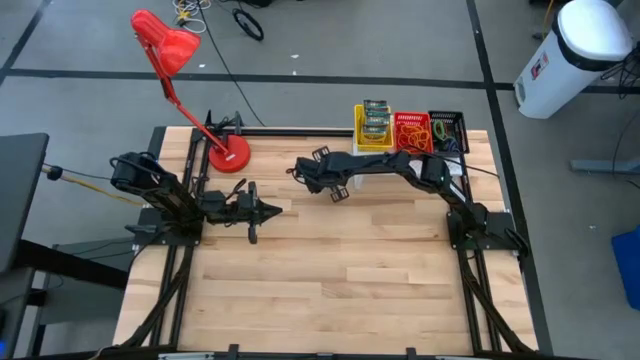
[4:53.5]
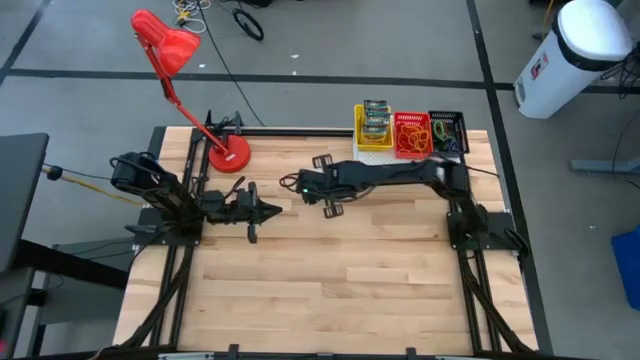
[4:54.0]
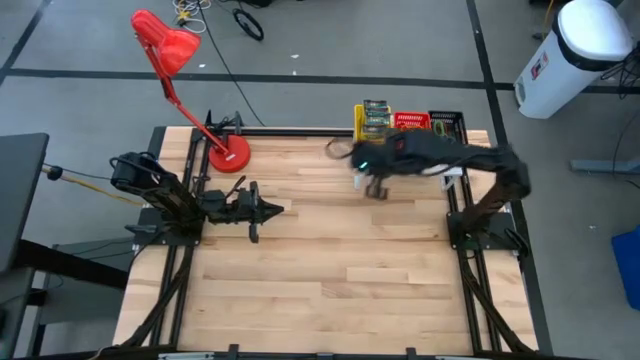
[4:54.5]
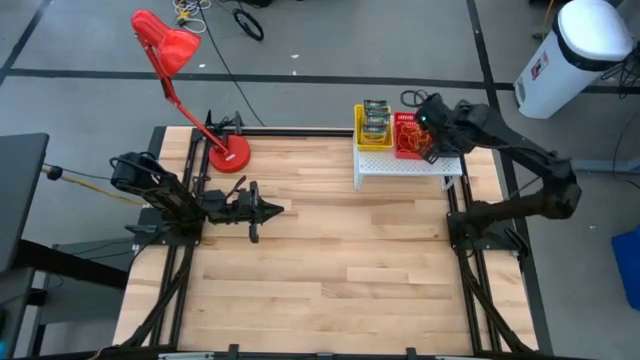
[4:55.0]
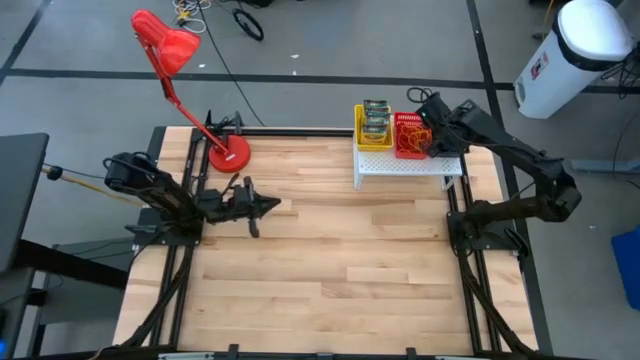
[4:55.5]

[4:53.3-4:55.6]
Task: Pick & Place Office Desk Supplies
Put the blue spring keychain on the black basket

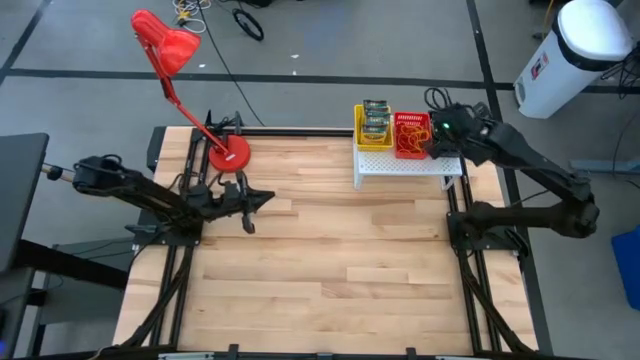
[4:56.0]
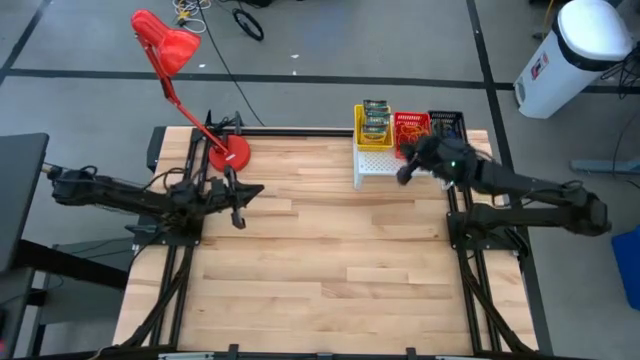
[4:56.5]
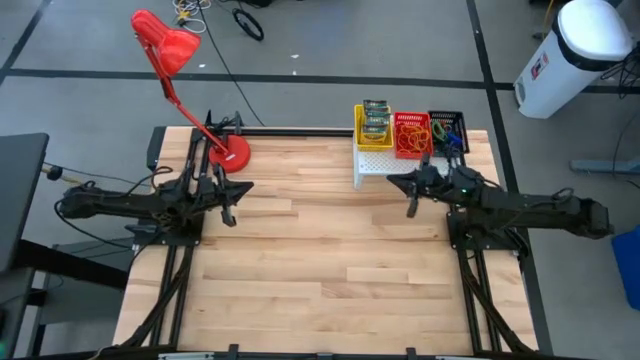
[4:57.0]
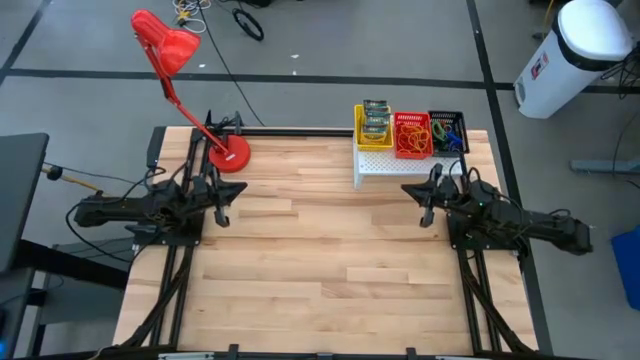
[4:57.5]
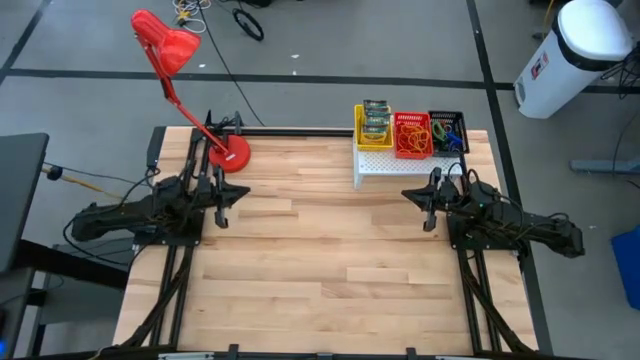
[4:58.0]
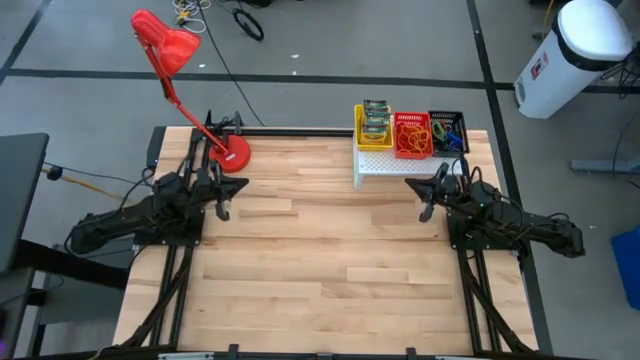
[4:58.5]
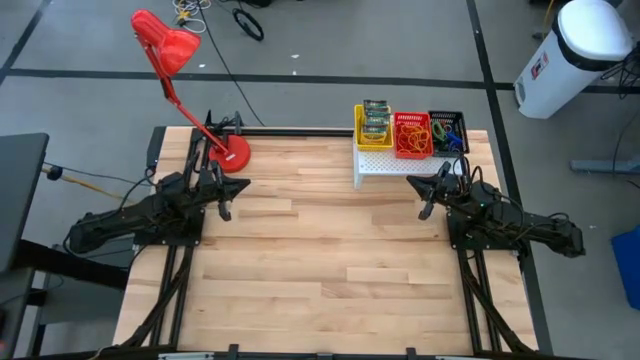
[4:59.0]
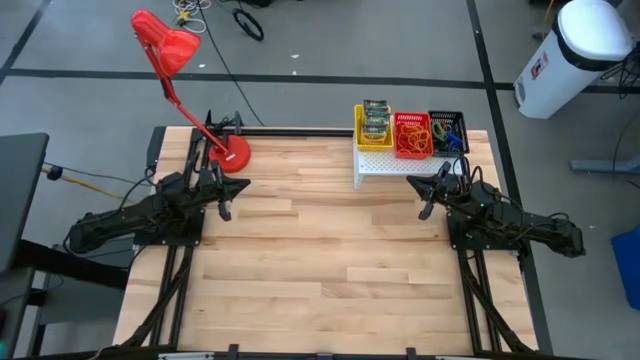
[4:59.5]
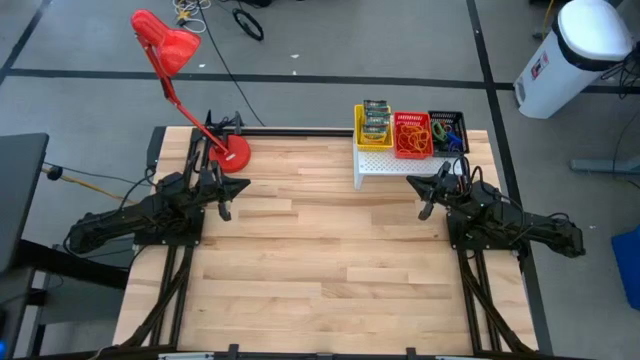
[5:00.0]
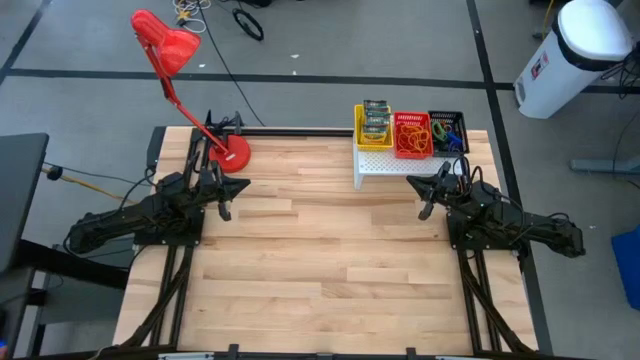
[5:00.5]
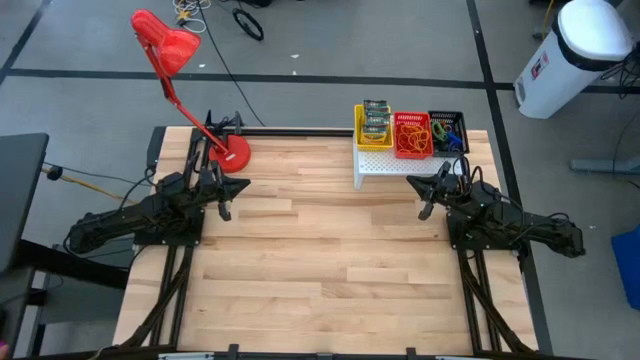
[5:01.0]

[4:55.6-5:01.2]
Return to Home Position

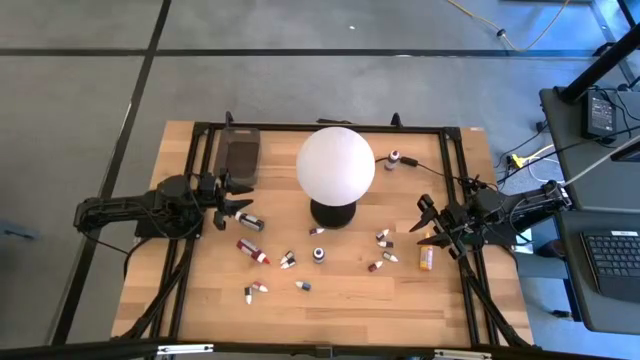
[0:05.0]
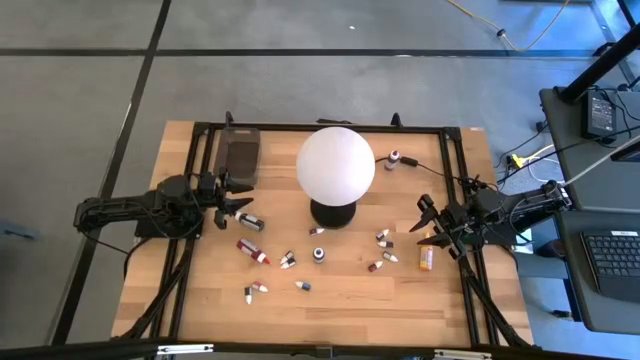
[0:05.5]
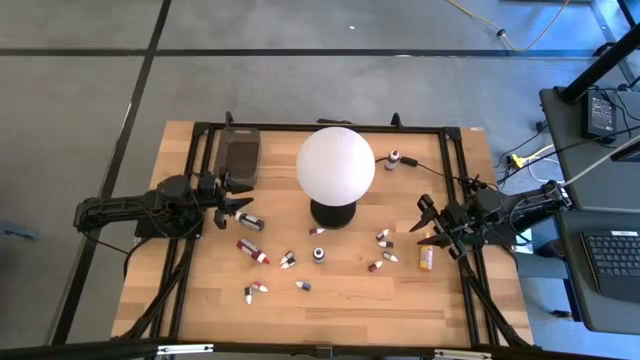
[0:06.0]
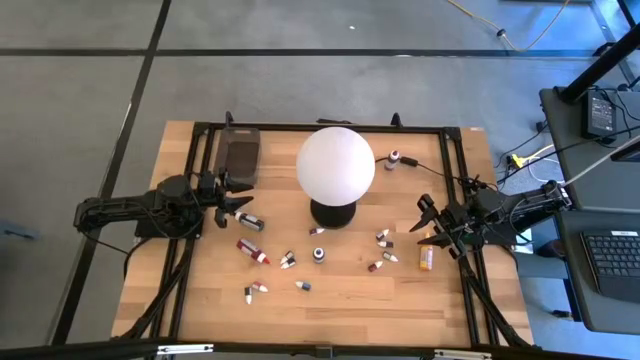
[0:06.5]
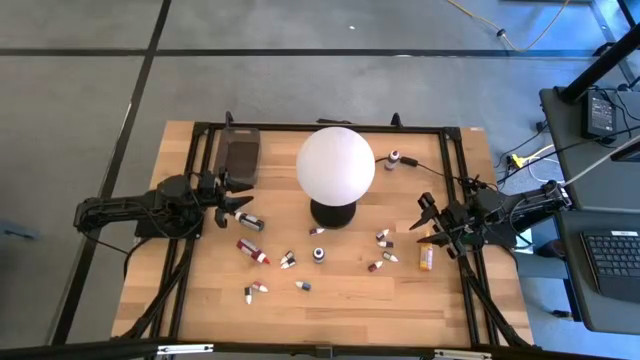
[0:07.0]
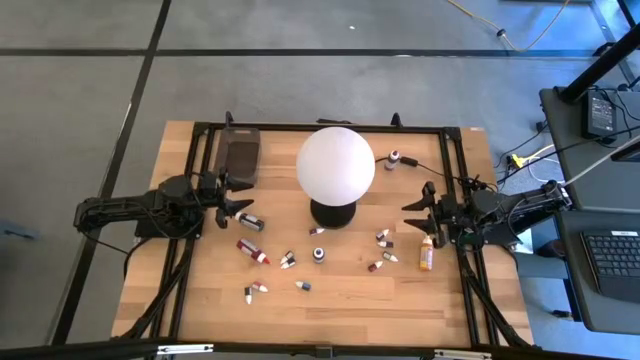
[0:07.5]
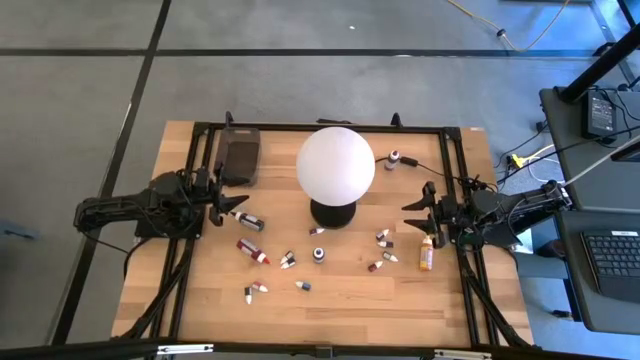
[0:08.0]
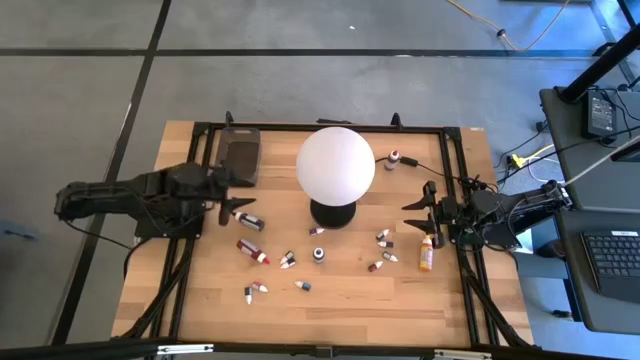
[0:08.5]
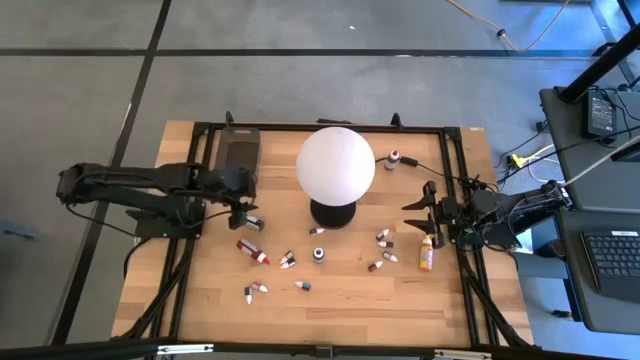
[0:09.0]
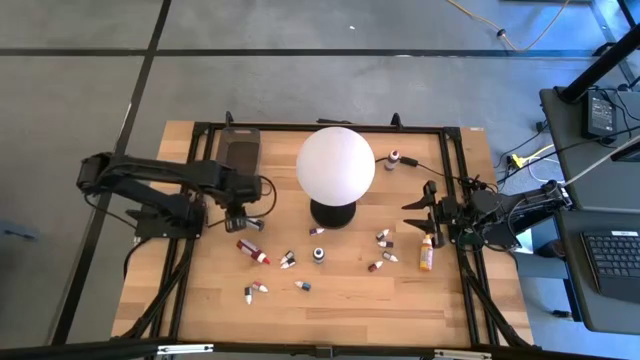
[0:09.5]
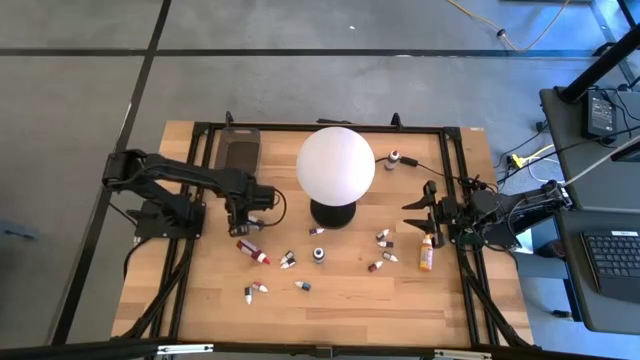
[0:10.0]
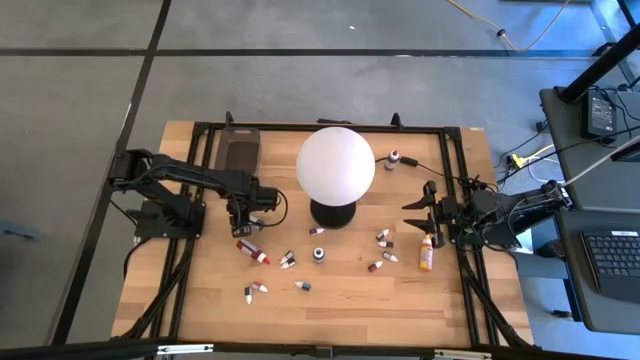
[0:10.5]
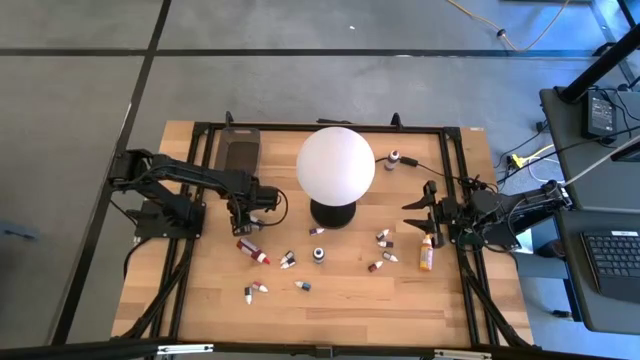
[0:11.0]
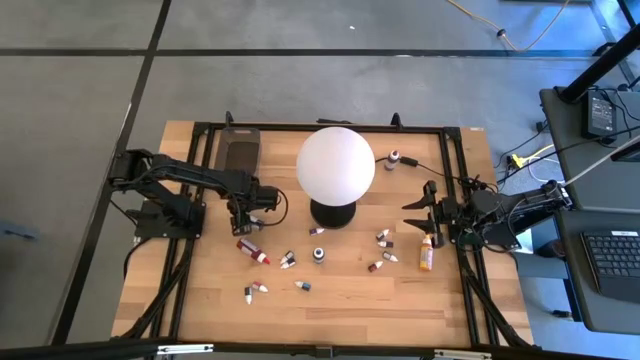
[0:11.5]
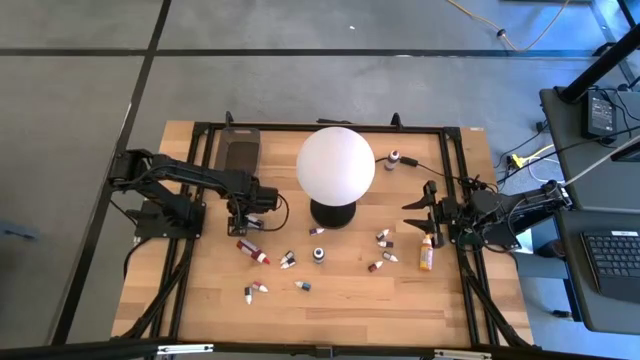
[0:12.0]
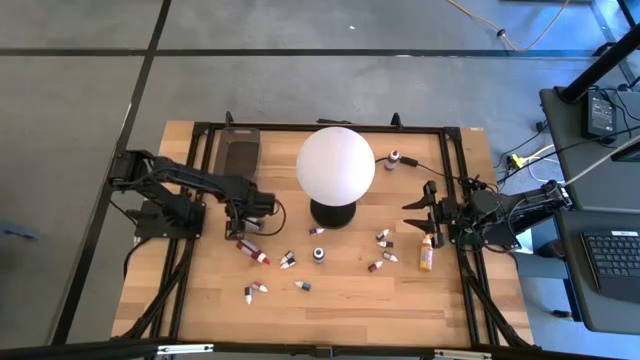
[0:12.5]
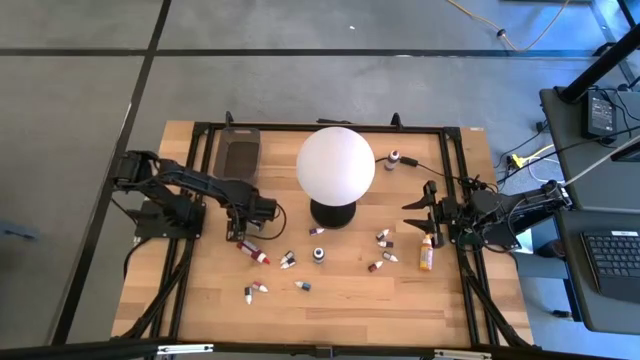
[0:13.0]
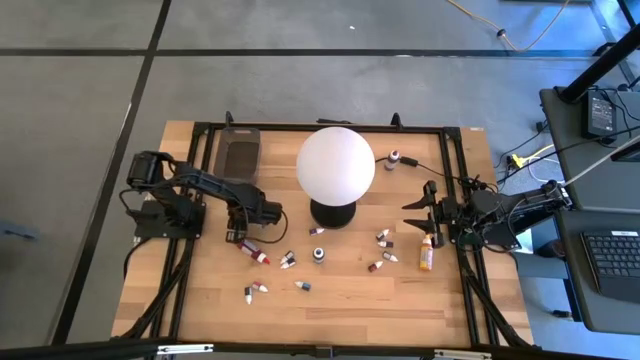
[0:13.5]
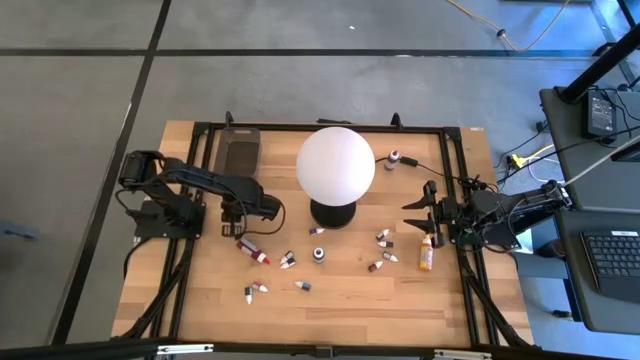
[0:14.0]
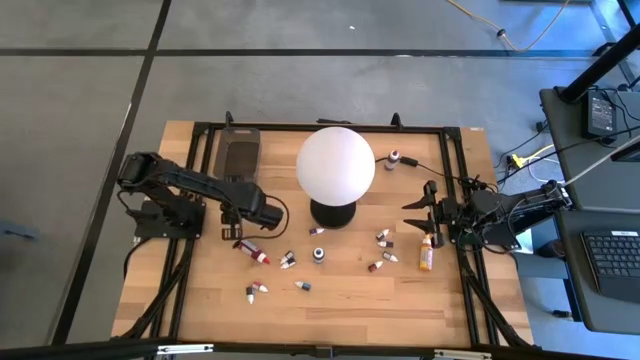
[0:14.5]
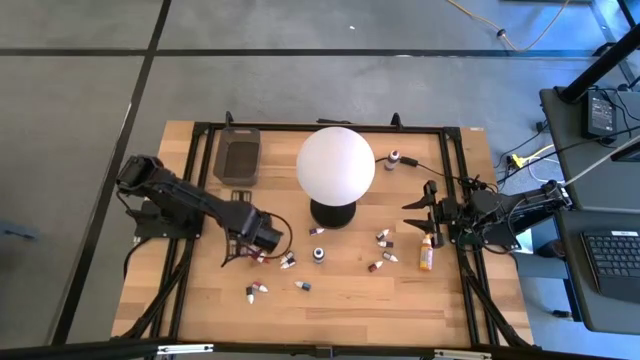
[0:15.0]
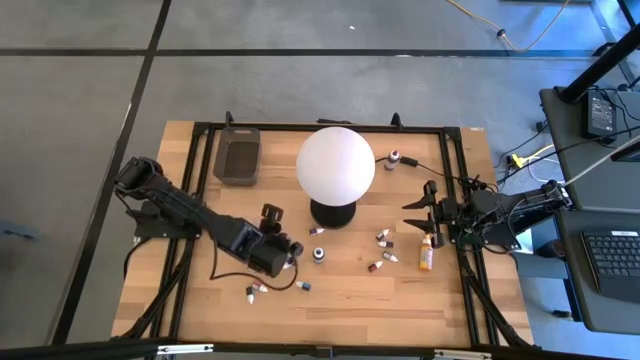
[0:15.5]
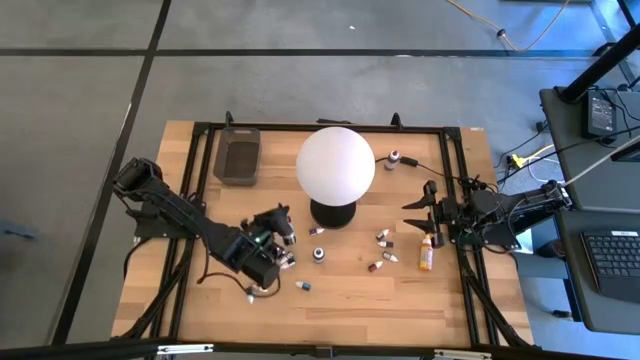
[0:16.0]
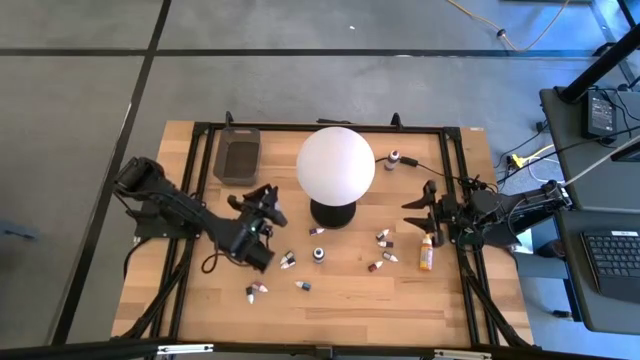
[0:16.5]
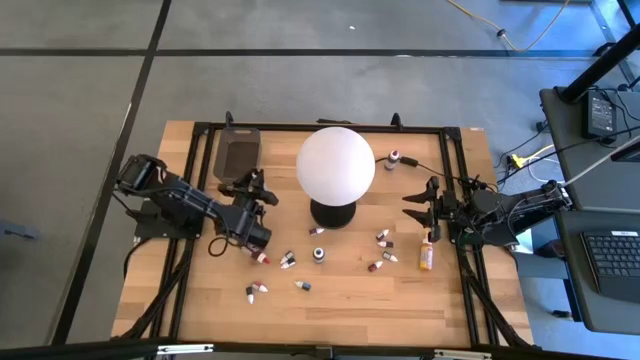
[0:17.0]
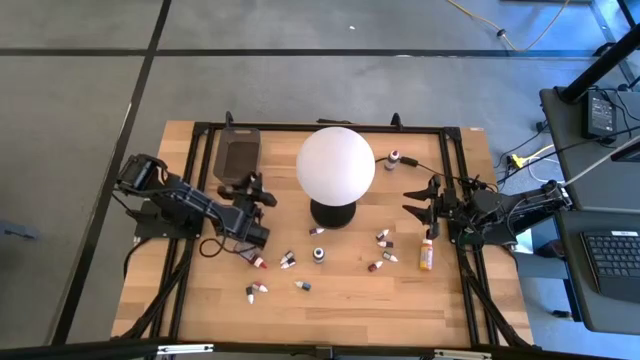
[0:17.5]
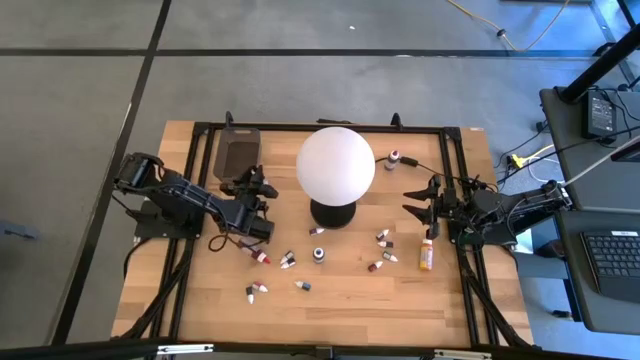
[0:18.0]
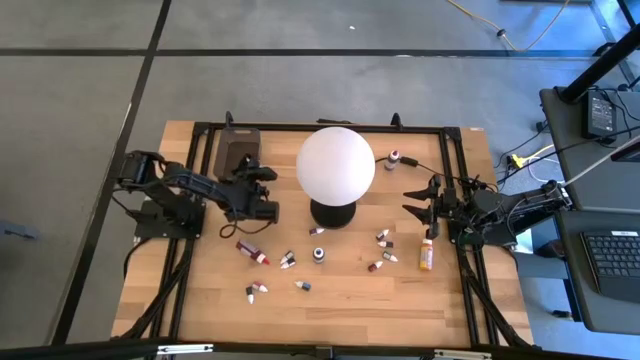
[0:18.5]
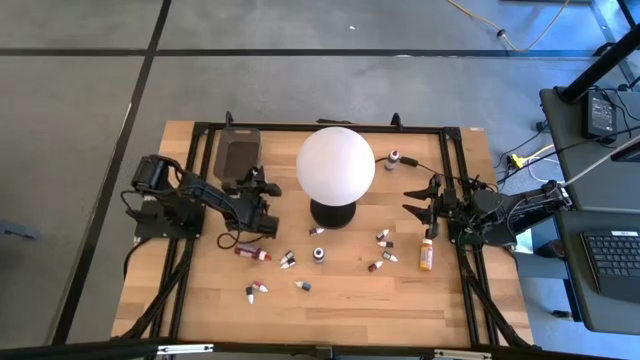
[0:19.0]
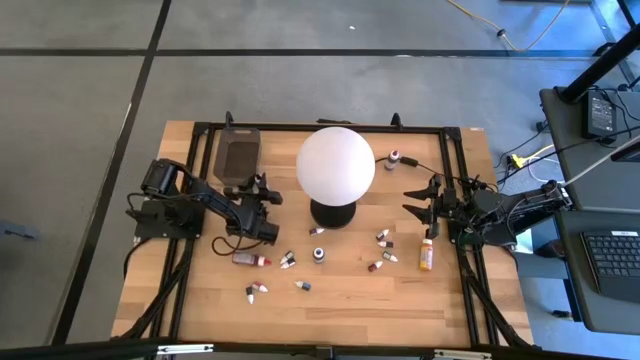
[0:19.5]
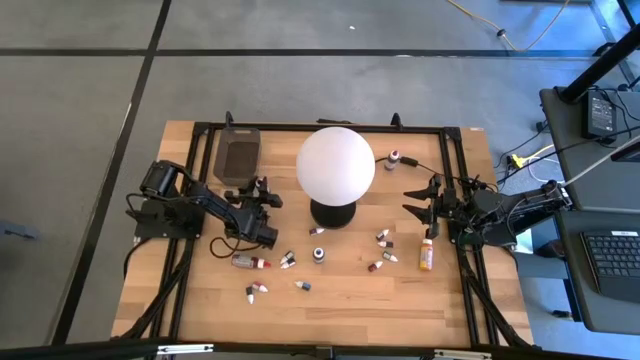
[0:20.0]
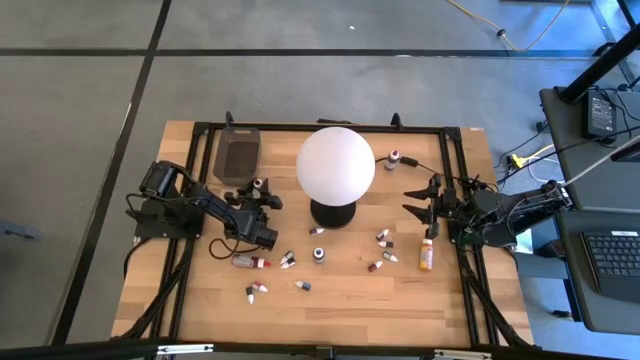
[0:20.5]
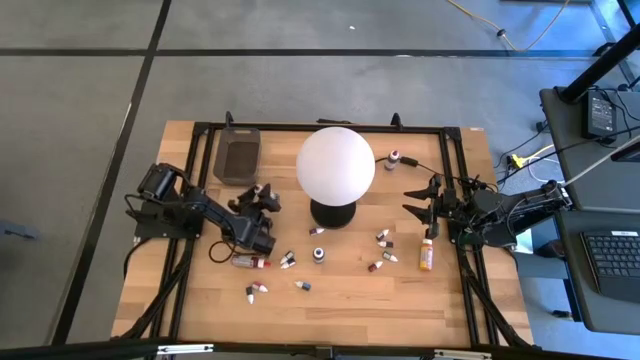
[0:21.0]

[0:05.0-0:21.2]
Task: Pick & Place food coloring
Put the big black food coloring bottle into the black container
